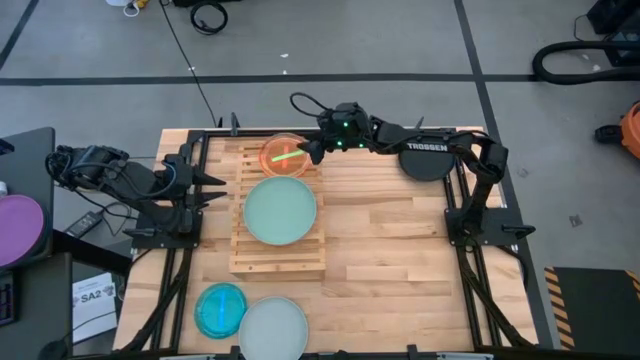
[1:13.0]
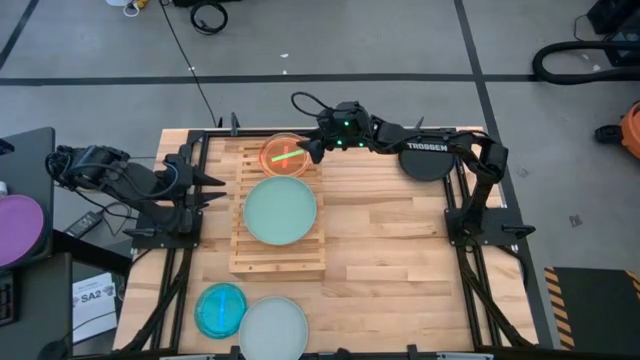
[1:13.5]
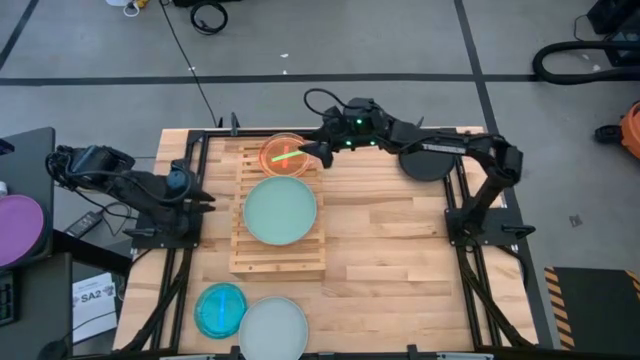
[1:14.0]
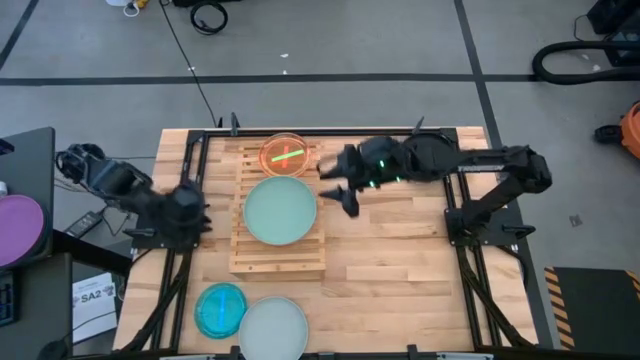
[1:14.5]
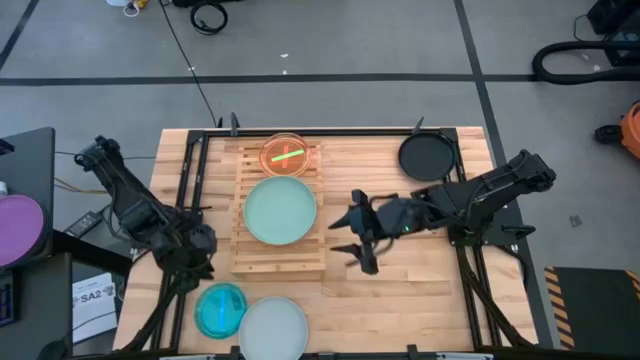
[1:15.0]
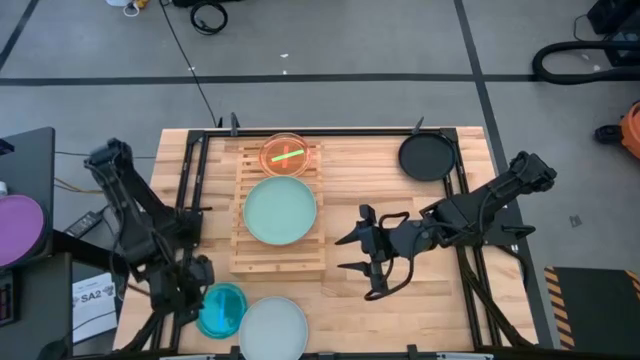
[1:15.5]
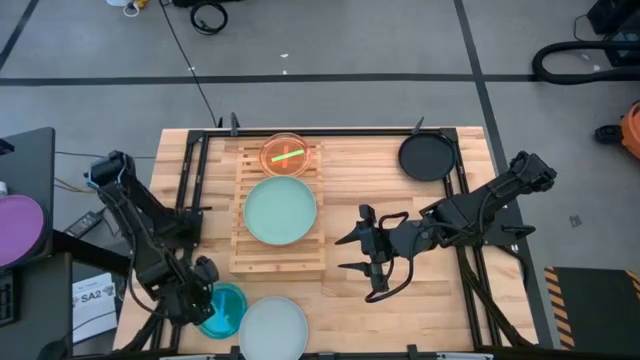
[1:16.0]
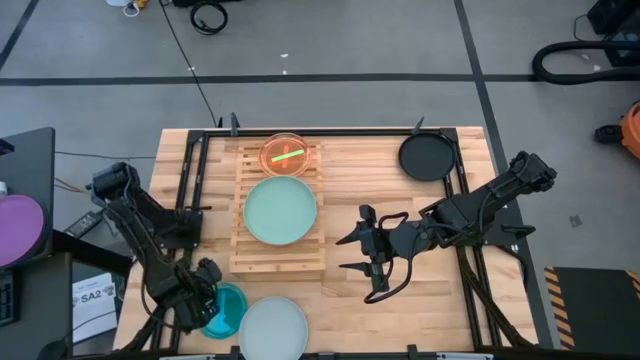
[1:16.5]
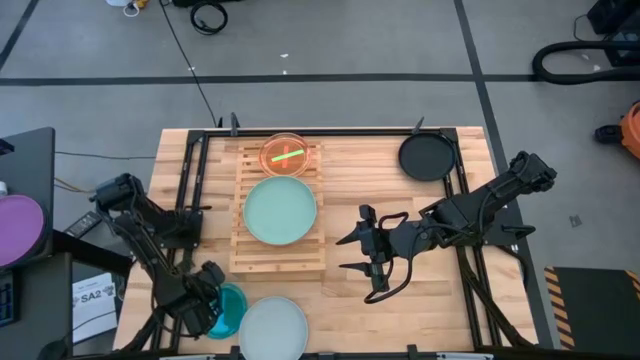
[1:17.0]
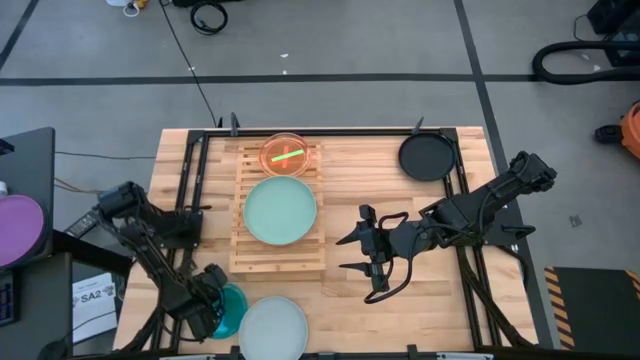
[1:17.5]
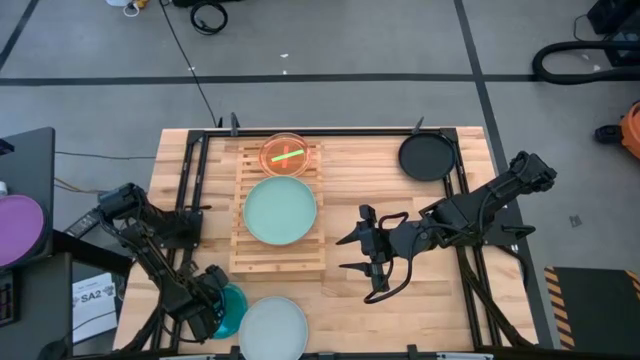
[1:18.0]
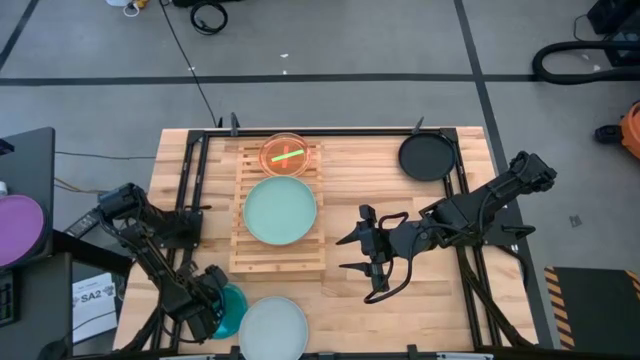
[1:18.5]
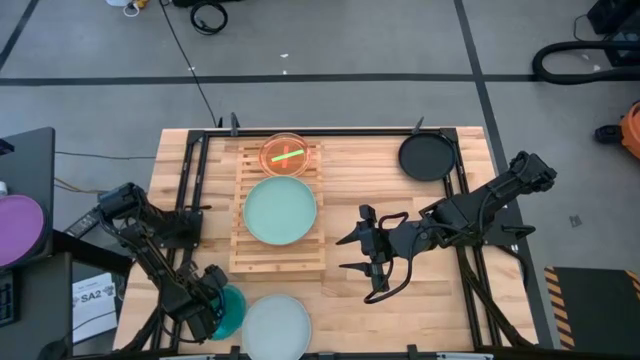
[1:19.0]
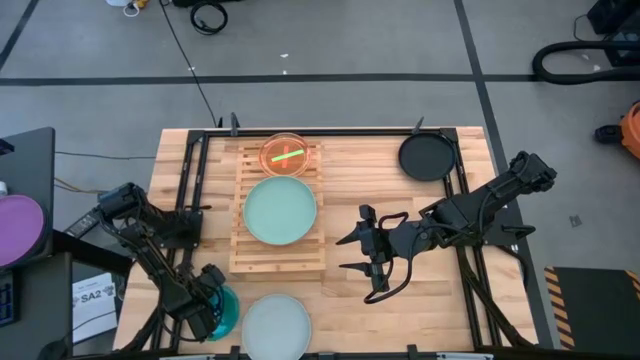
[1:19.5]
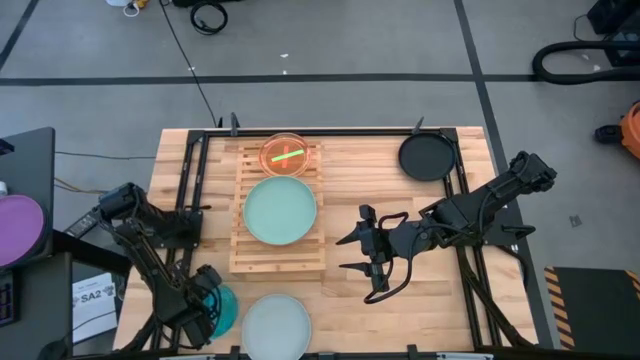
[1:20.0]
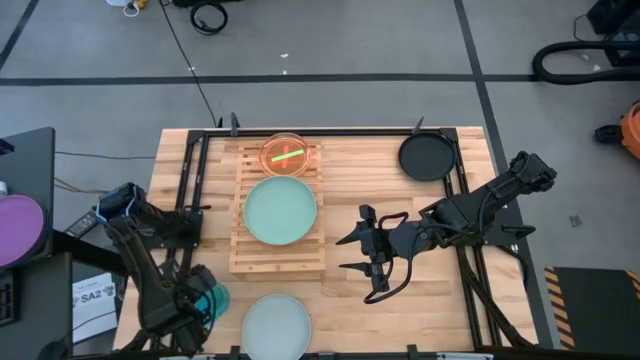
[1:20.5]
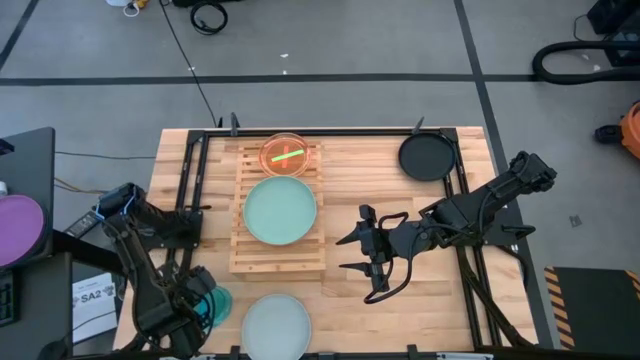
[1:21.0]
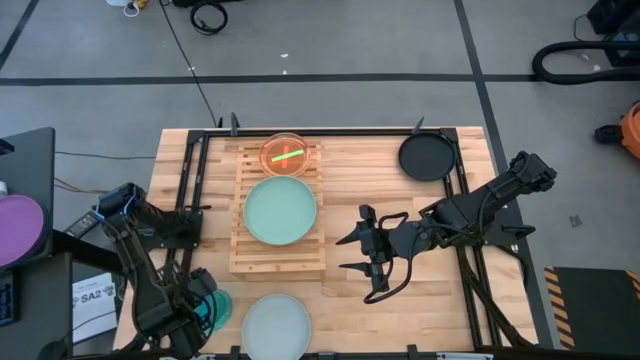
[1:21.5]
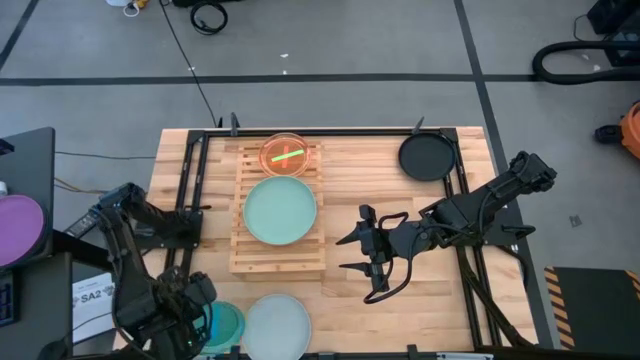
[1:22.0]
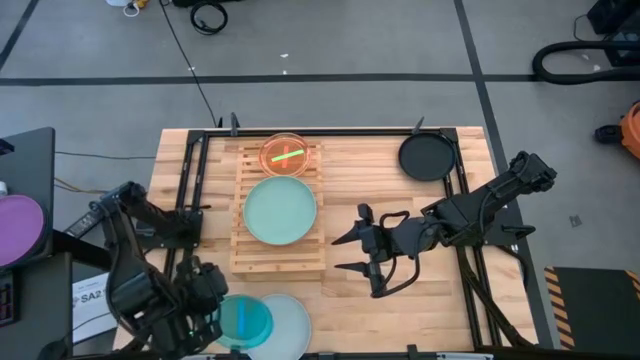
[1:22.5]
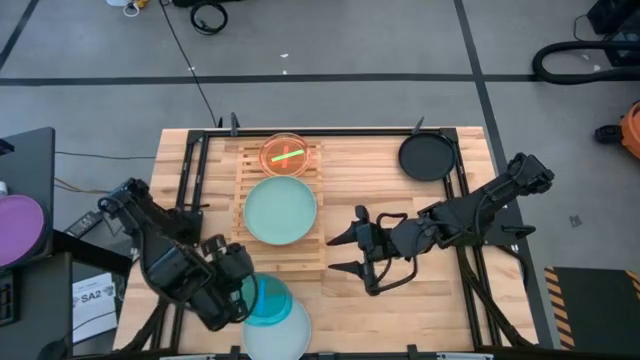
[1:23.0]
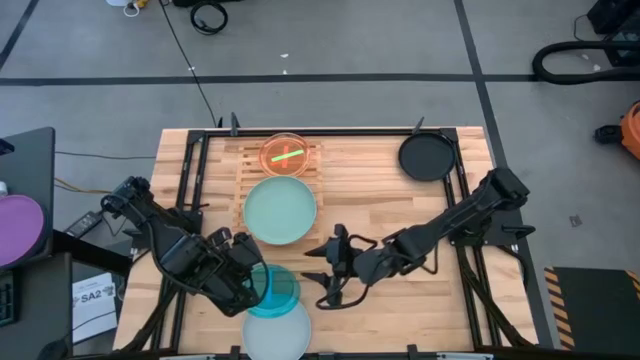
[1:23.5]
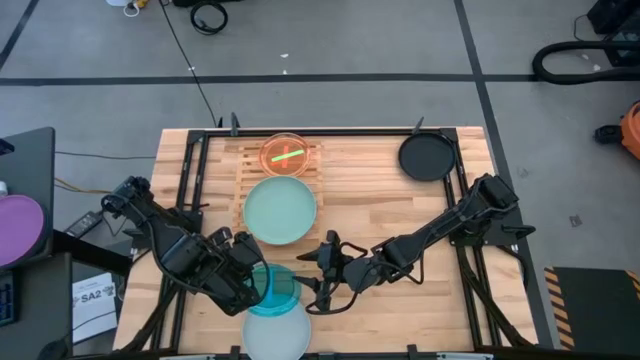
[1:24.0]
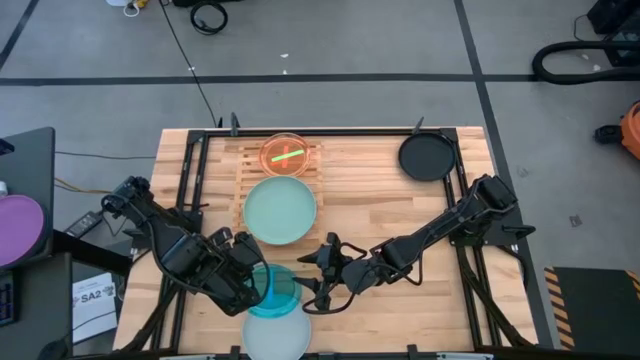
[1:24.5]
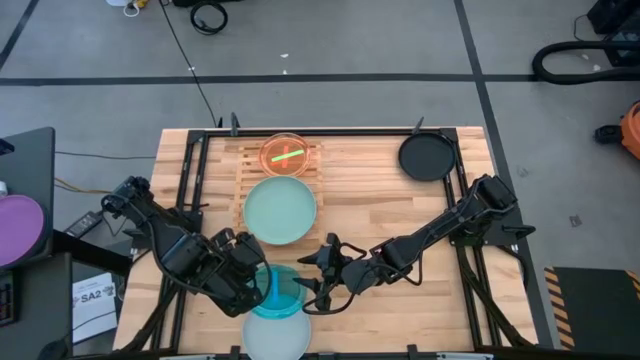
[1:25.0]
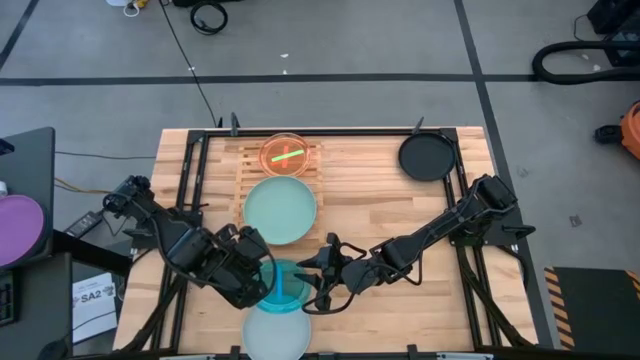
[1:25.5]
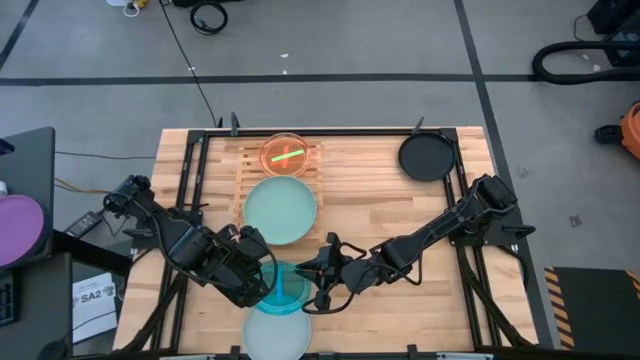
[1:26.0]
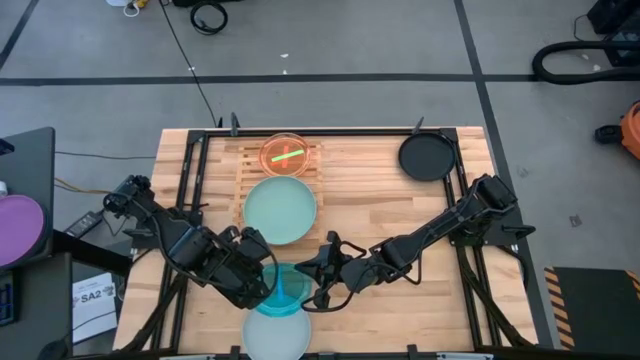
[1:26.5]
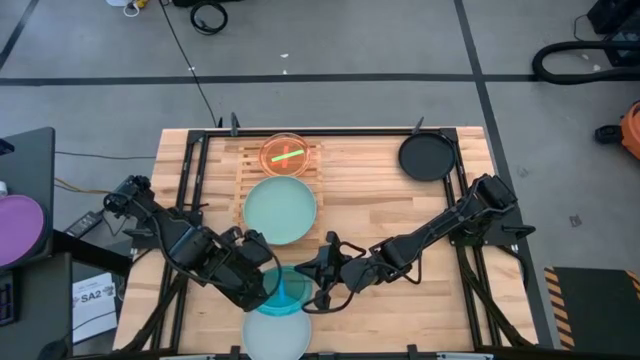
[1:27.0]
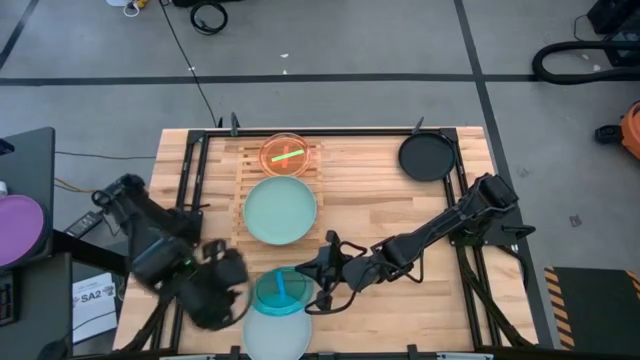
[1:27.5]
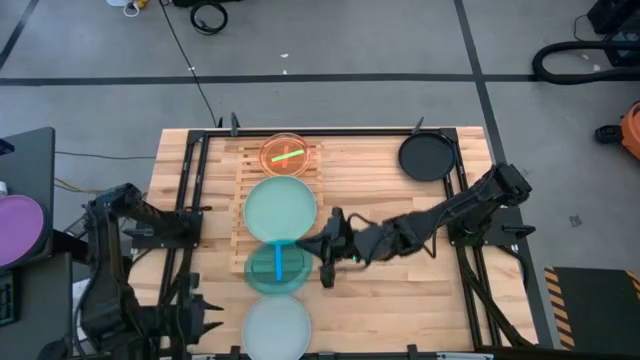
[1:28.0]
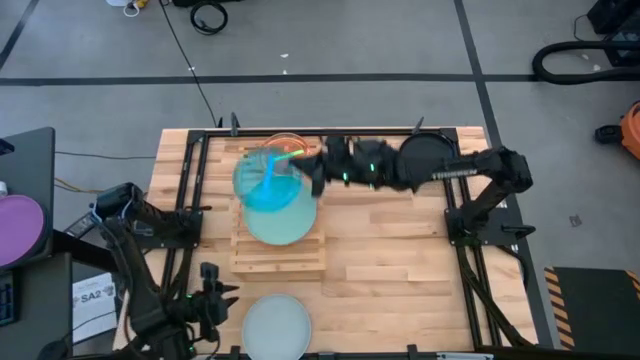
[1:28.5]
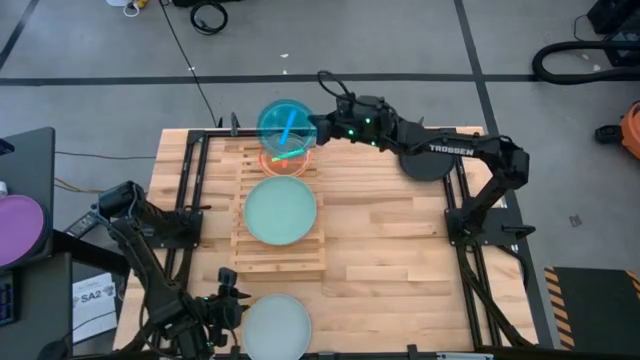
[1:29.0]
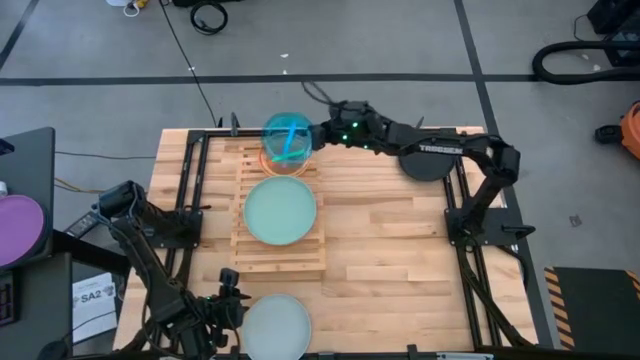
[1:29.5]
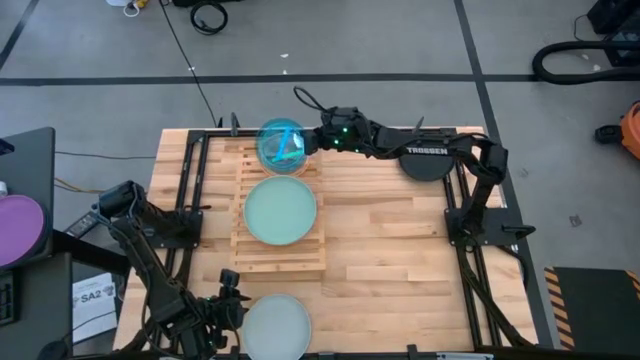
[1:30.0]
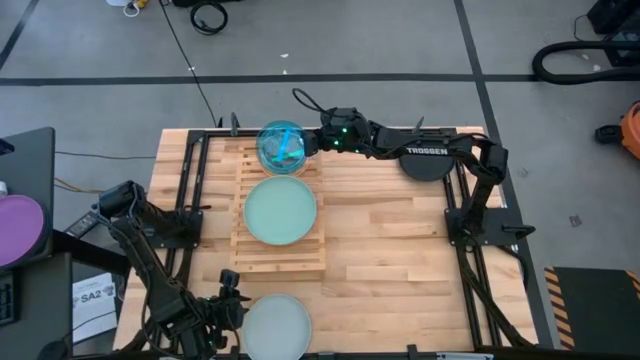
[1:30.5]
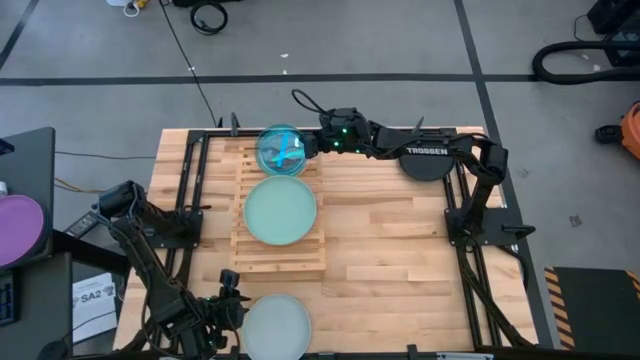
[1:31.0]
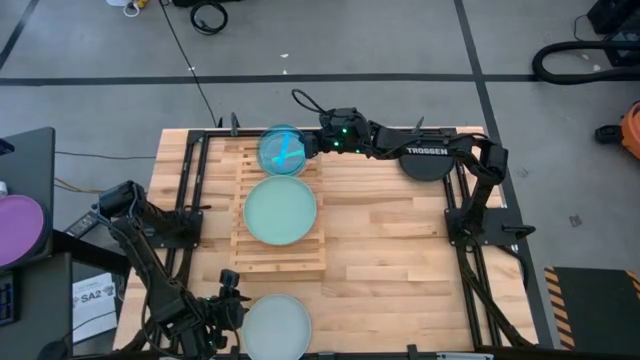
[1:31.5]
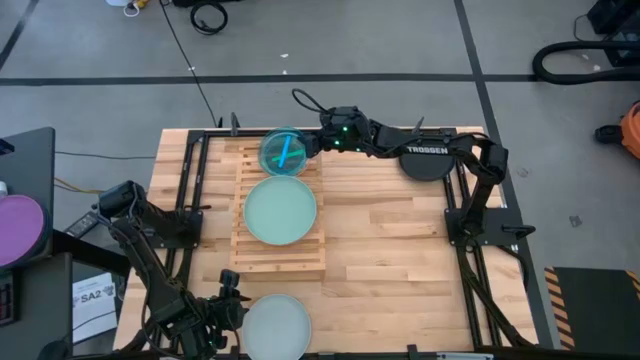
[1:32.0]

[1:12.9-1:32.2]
Task: Place and stack plates onto a shelf
Stack the blue transparent plate on the green transparent plate

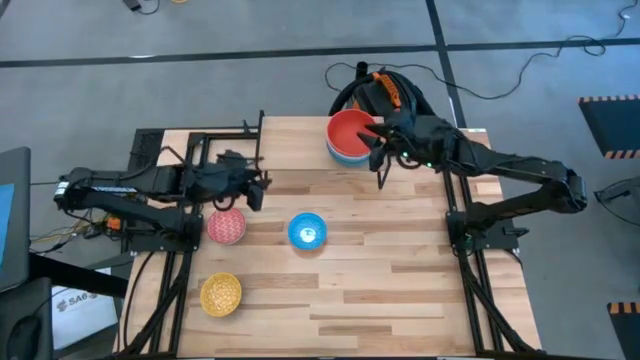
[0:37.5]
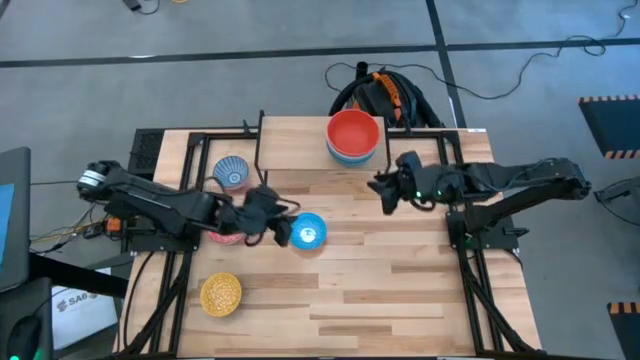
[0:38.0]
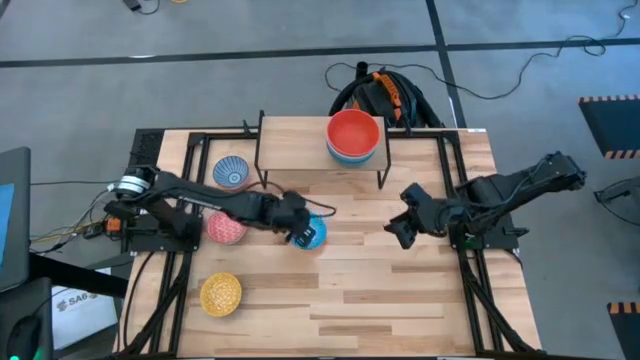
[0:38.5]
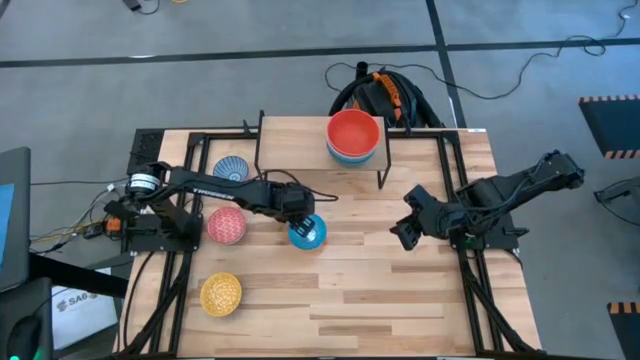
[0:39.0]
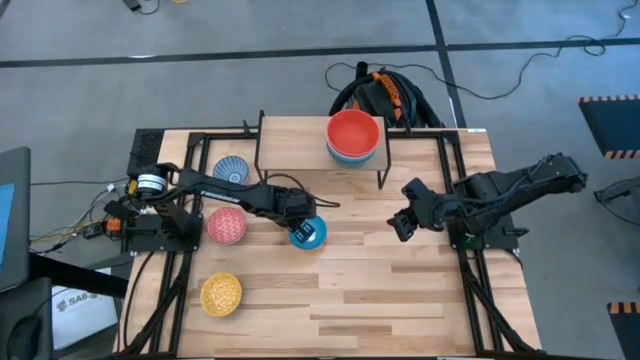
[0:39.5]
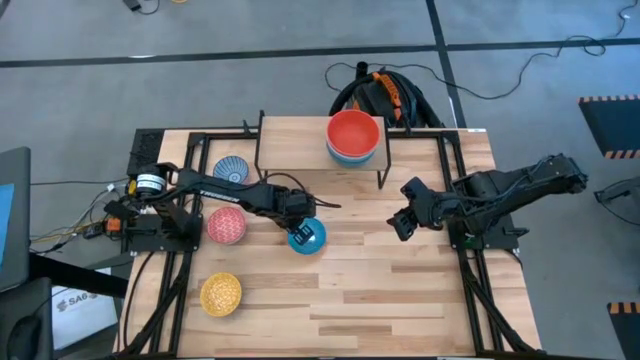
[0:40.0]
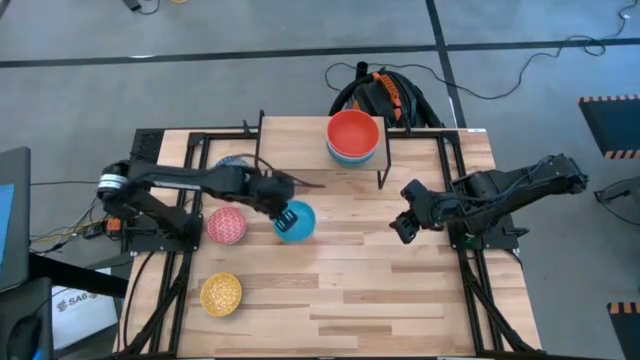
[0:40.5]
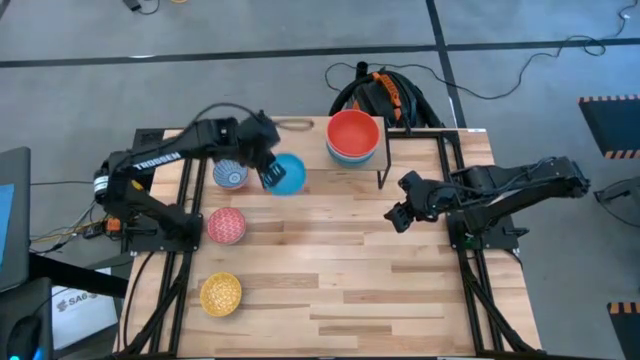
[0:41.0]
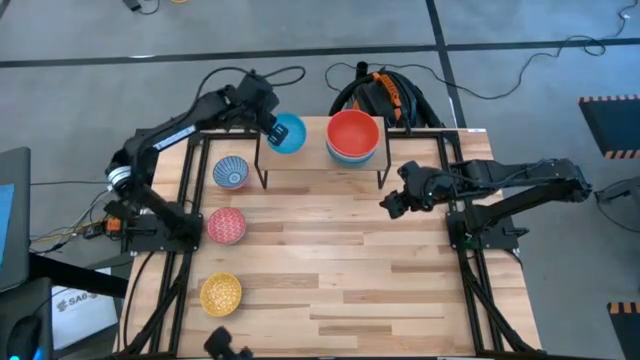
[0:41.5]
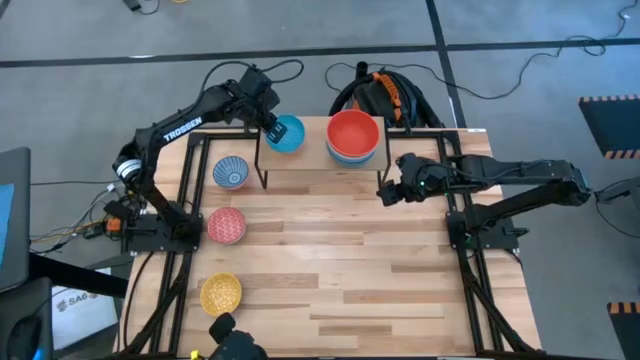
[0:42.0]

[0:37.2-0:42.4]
Task: Place and stack bowls onto a shelf
Put the light blue patterned bowl on the shelf
